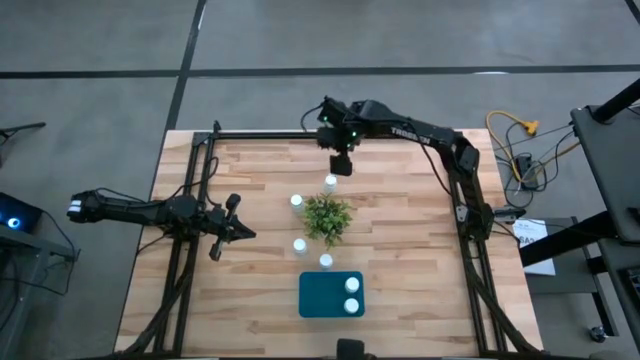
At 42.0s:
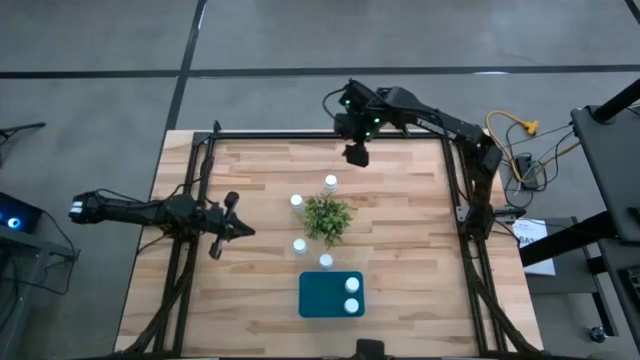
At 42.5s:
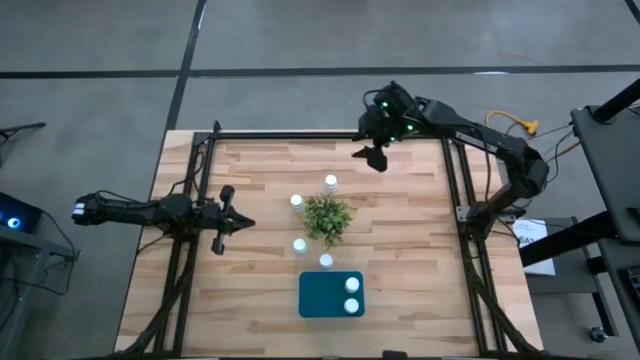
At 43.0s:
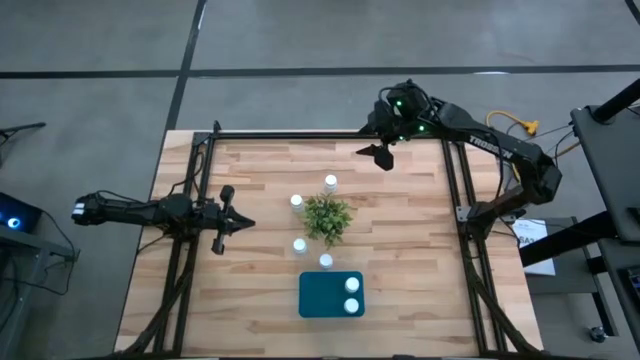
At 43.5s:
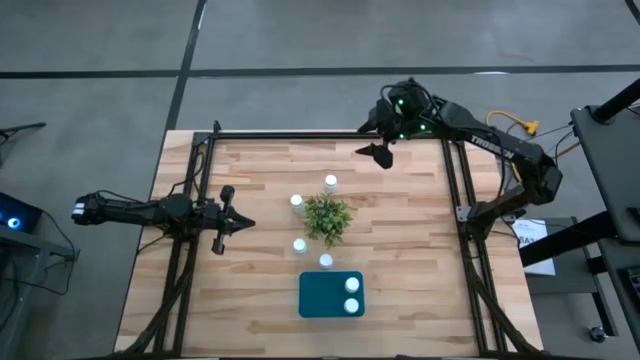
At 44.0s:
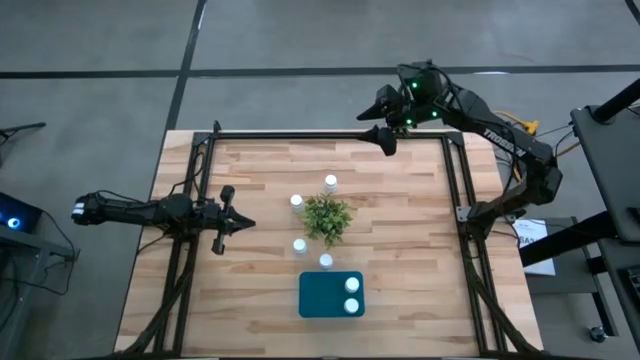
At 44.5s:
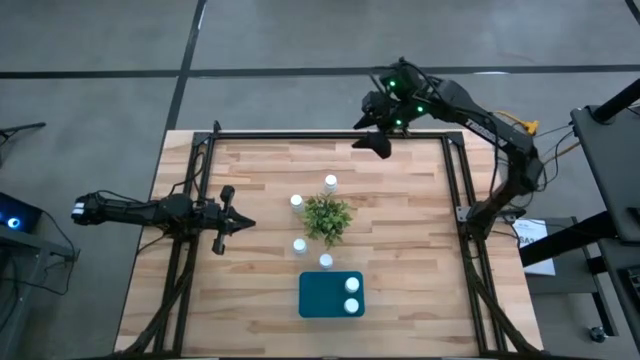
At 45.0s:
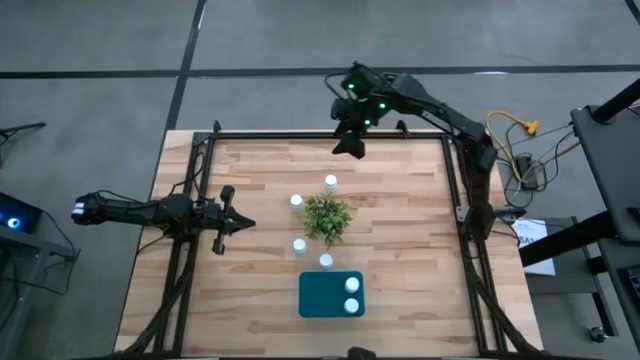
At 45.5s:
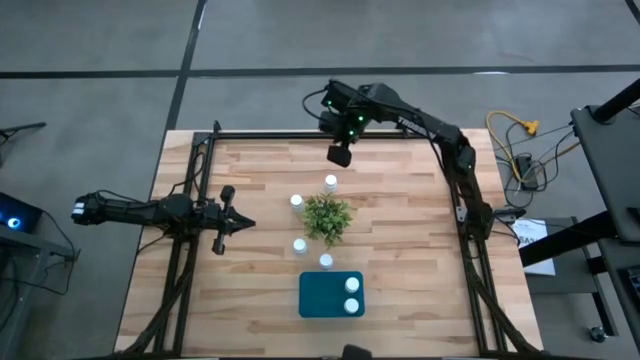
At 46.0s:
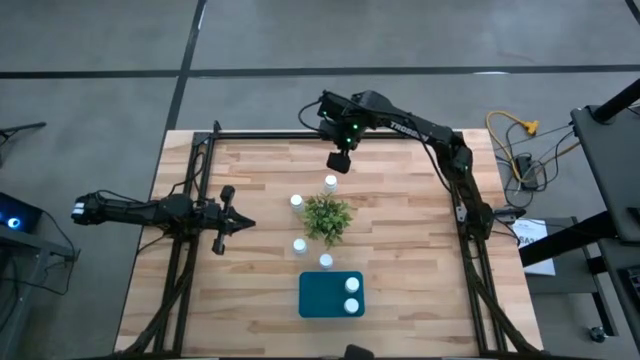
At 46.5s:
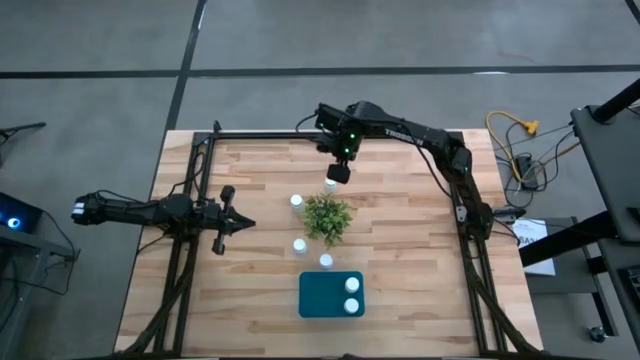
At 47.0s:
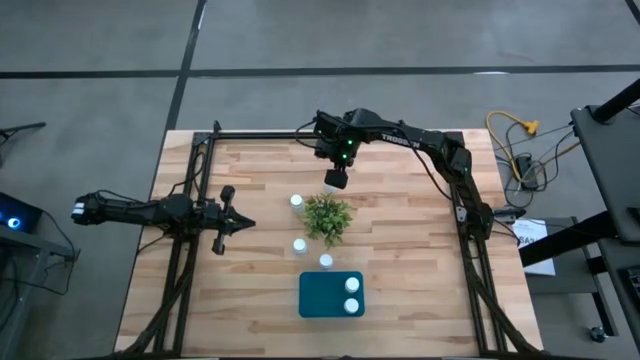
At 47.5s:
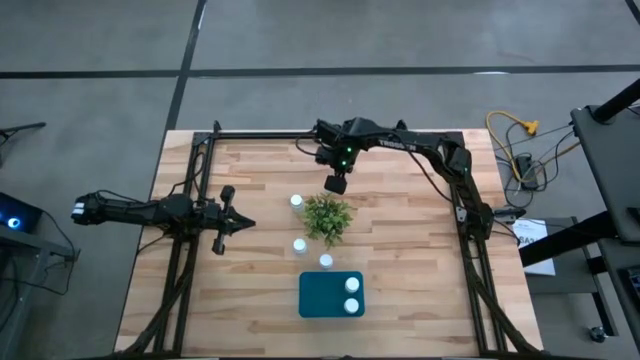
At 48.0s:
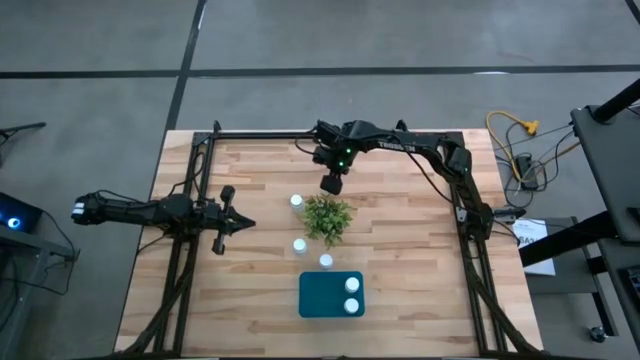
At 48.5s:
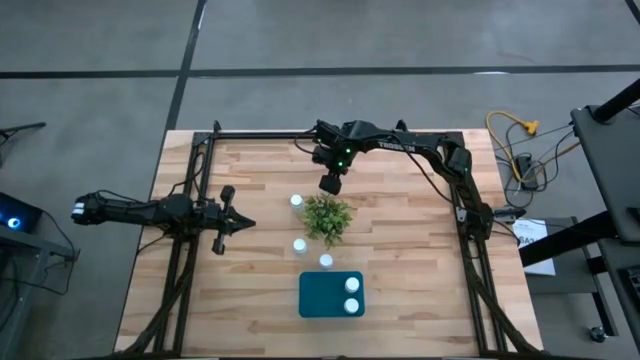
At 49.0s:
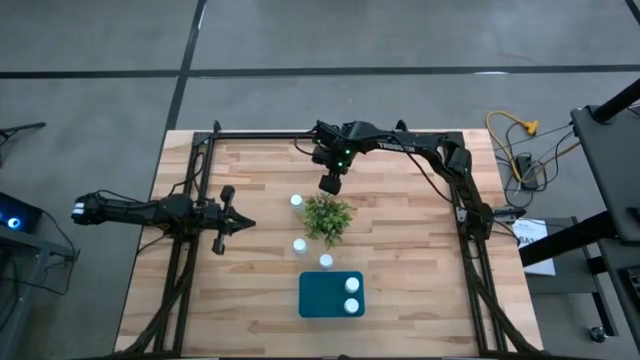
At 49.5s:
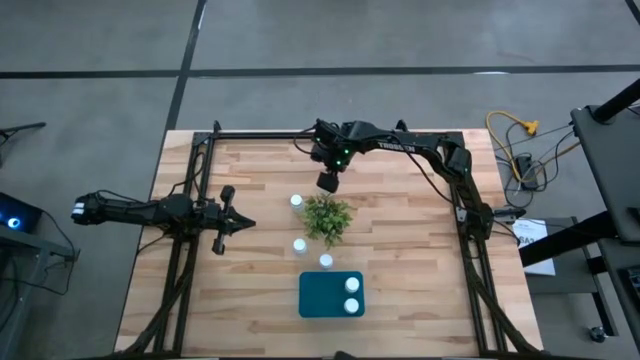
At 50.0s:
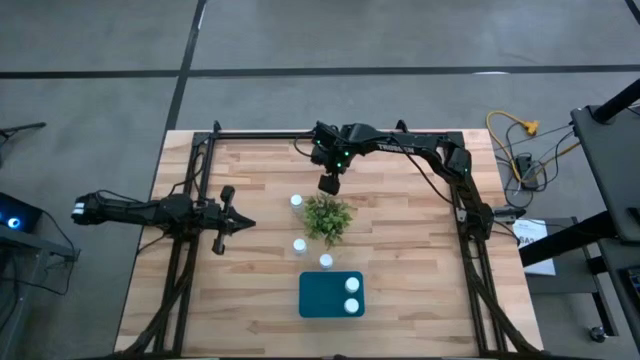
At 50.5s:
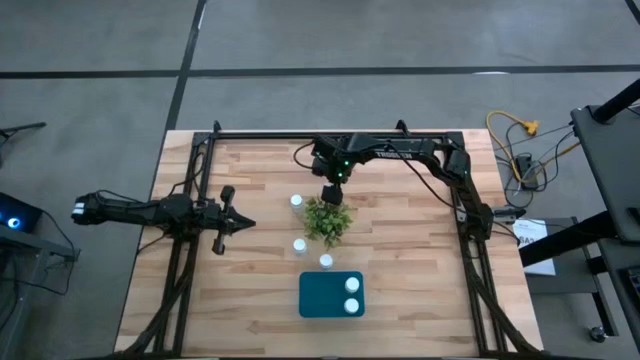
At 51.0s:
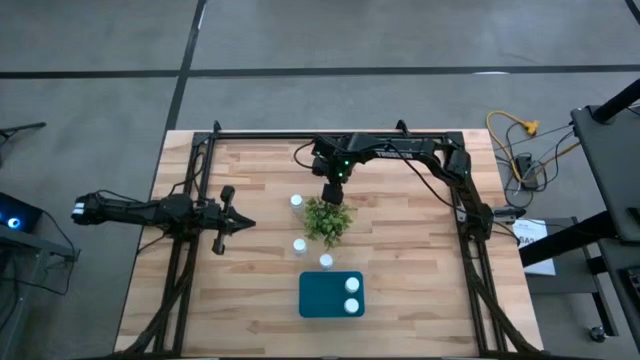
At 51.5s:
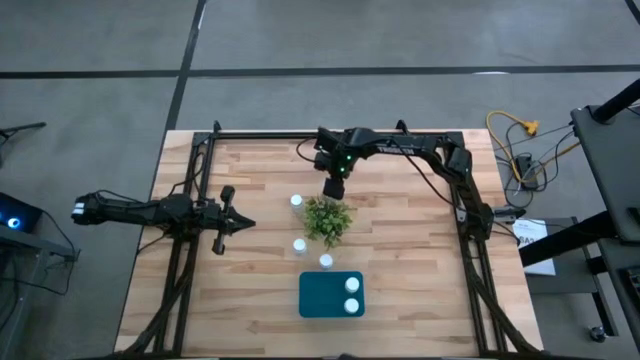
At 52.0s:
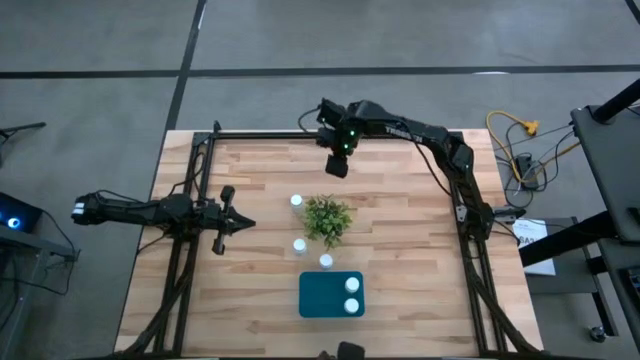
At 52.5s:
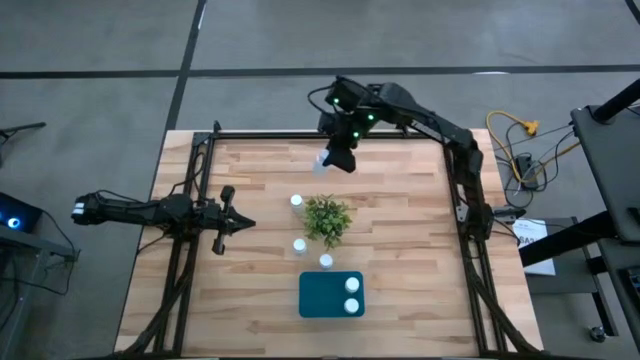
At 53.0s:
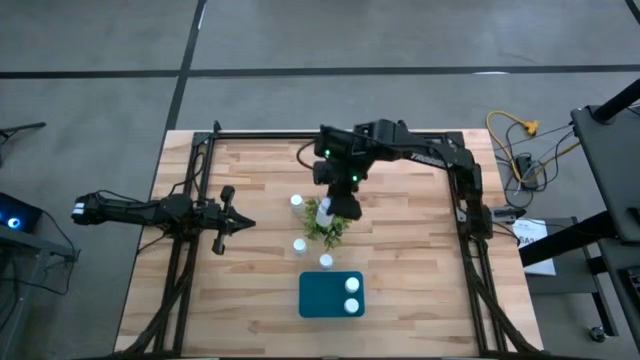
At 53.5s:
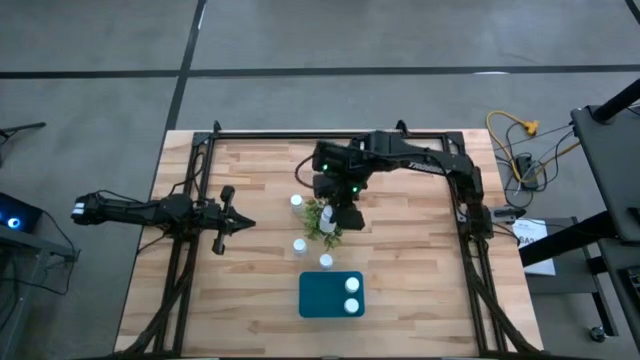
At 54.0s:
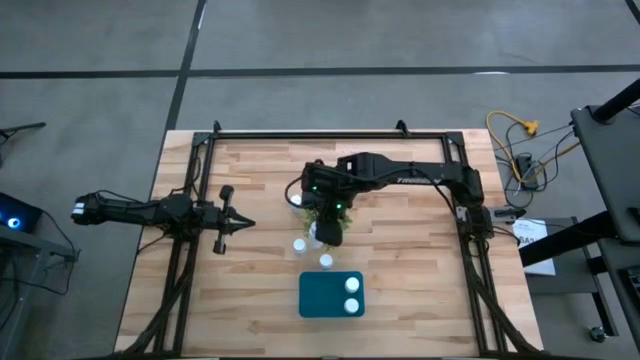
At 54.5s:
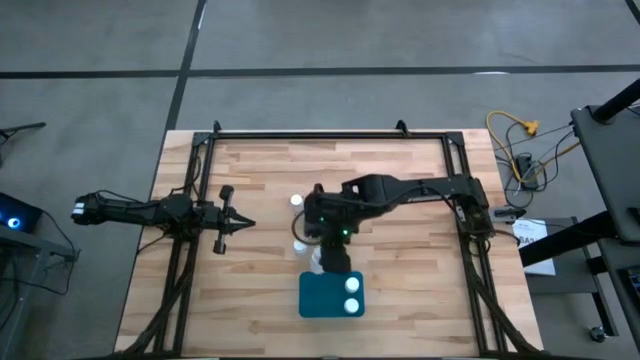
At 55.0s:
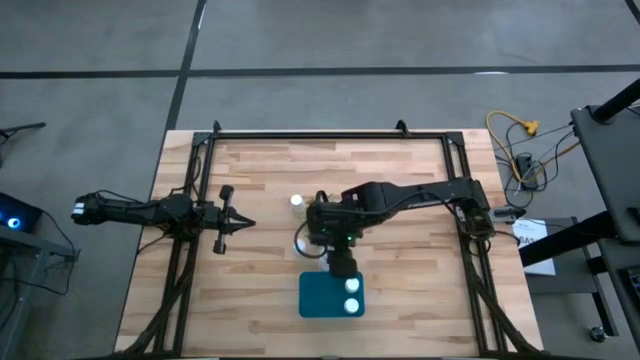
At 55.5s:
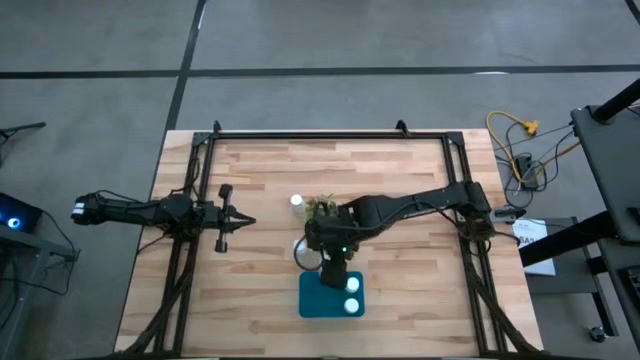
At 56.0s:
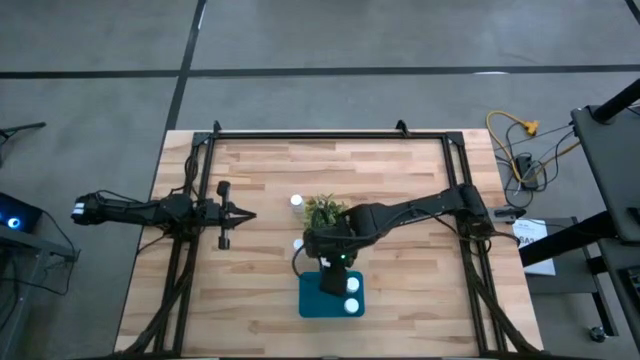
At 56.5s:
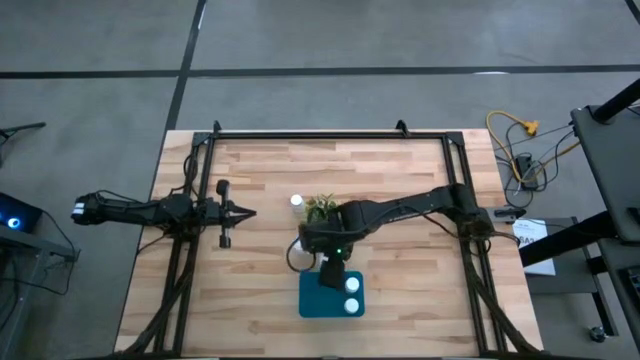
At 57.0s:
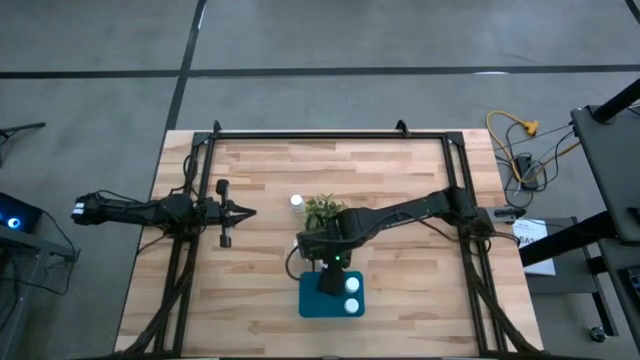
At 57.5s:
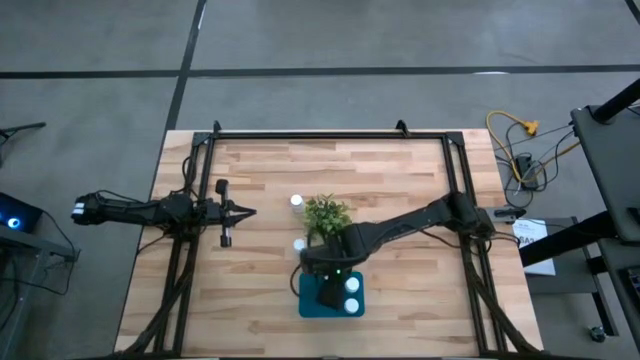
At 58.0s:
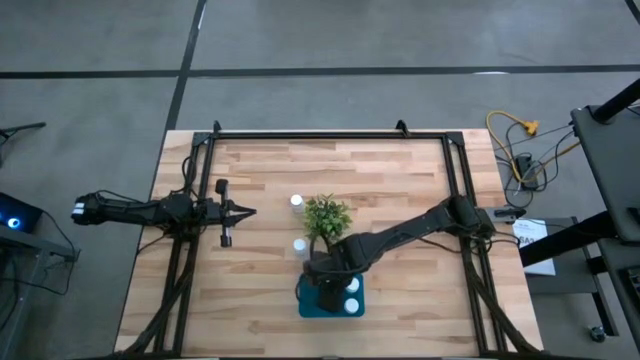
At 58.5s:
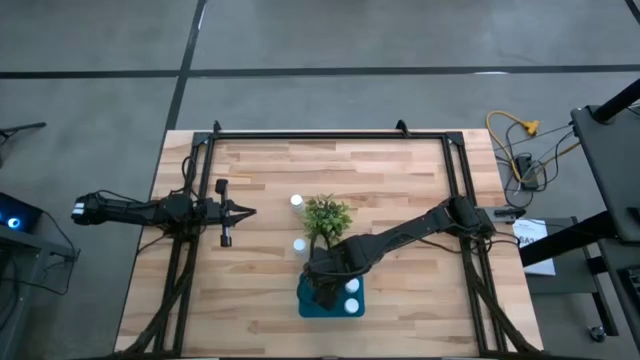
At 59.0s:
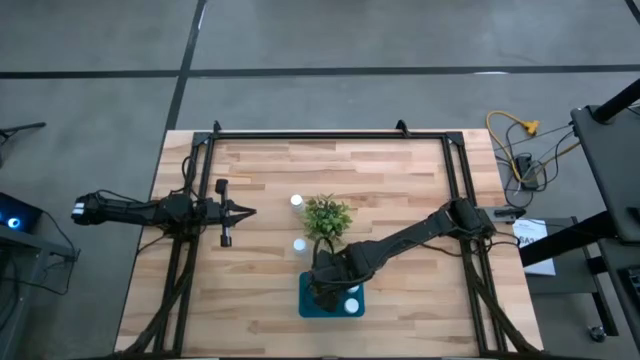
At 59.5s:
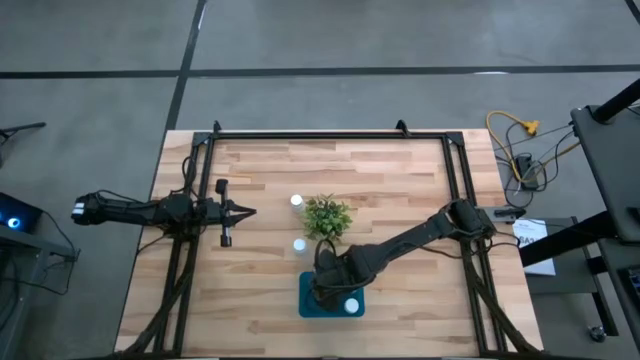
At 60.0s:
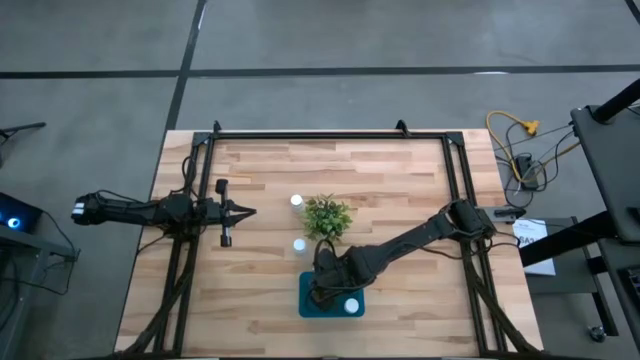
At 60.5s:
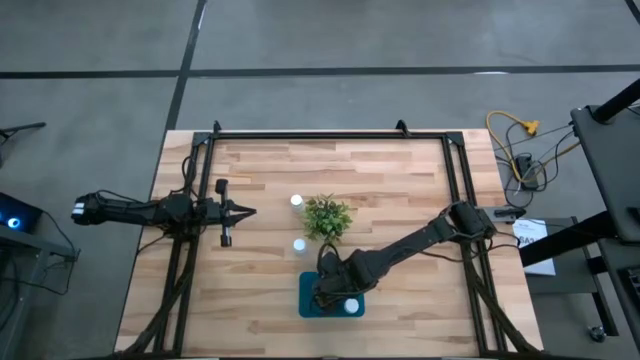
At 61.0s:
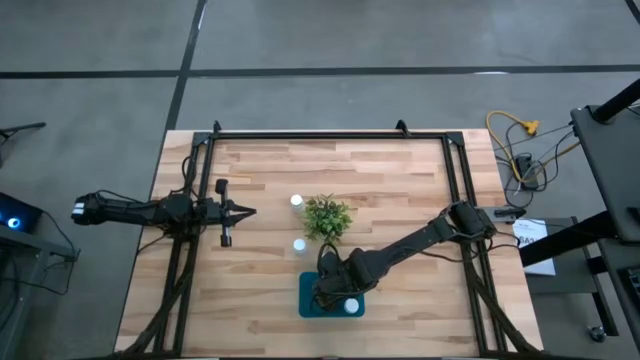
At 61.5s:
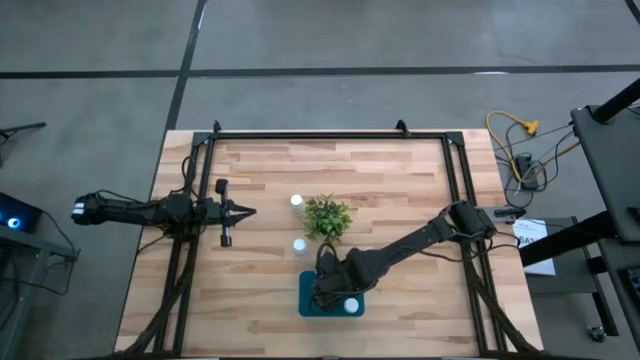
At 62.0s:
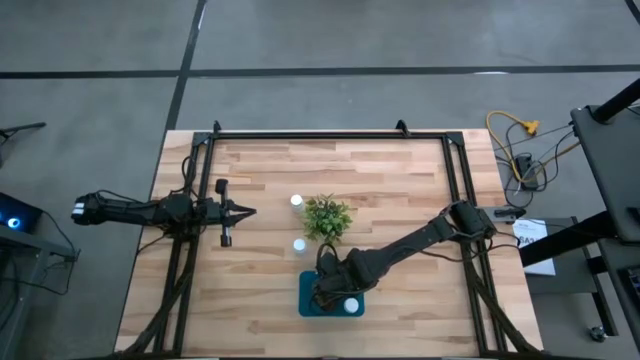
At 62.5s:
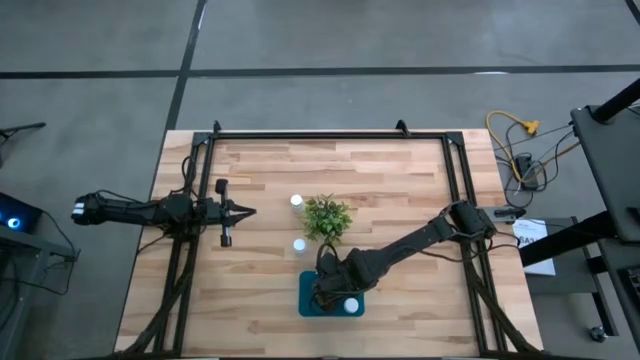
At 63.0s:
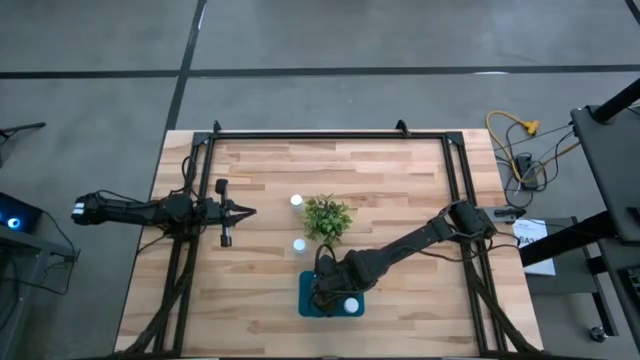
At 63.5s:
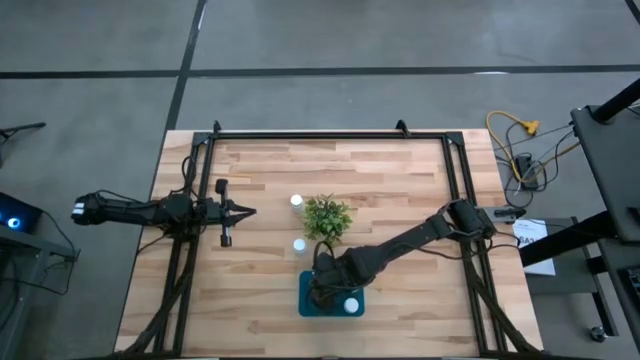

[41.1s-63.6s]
Task: Pick and place pill bottles into a basket
Put the white medicine bottle into the blue bin
